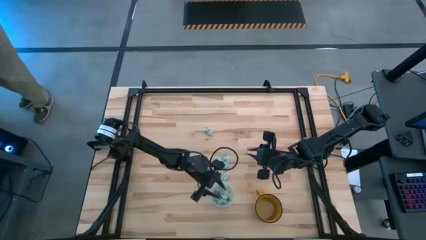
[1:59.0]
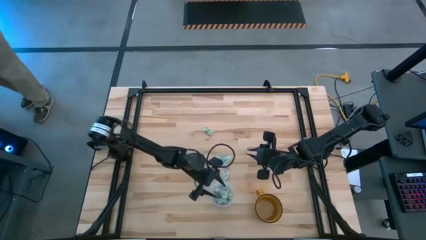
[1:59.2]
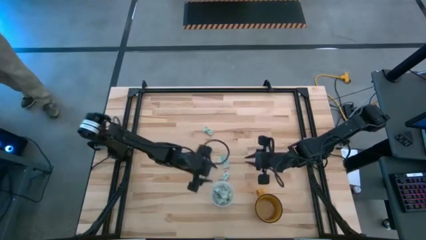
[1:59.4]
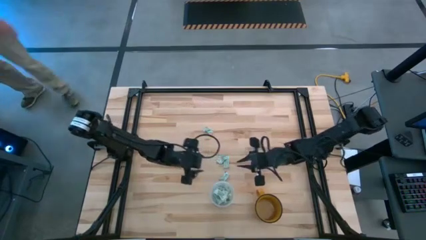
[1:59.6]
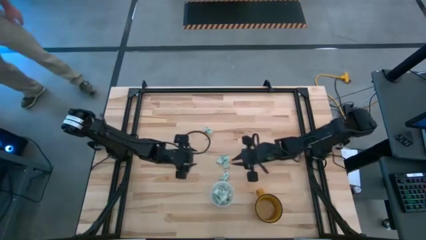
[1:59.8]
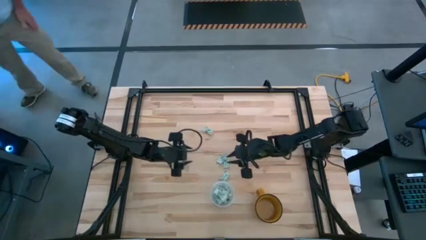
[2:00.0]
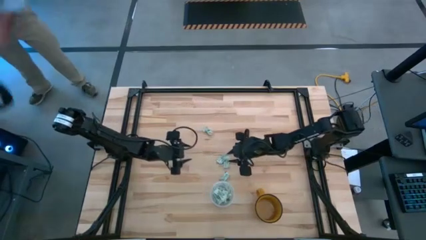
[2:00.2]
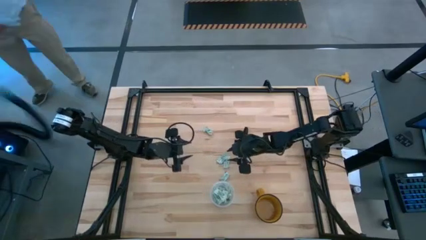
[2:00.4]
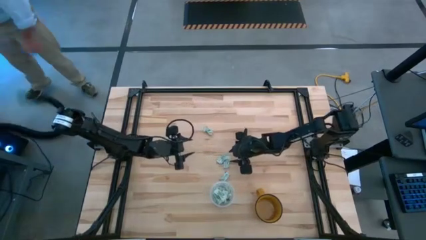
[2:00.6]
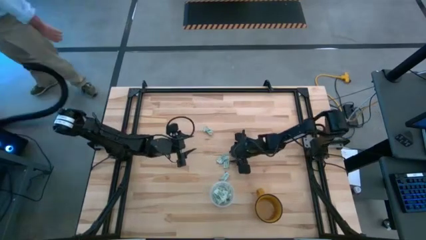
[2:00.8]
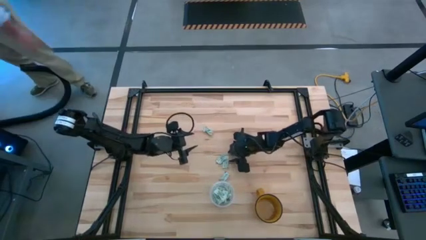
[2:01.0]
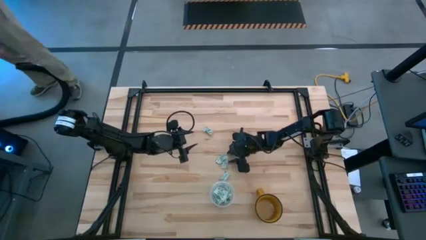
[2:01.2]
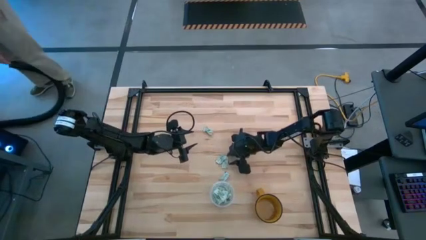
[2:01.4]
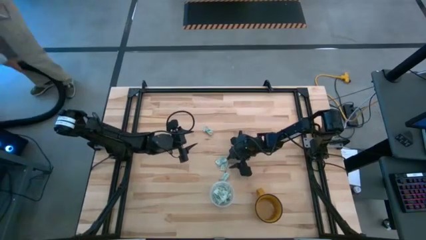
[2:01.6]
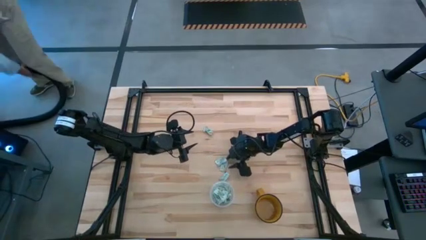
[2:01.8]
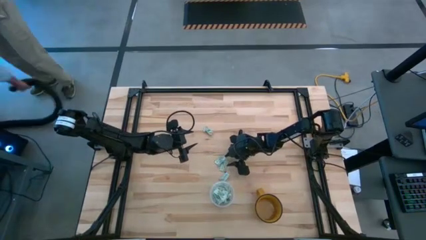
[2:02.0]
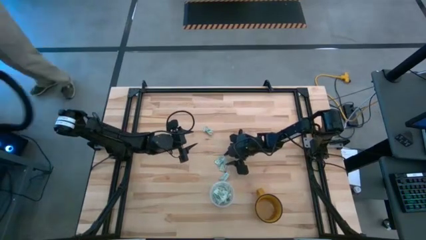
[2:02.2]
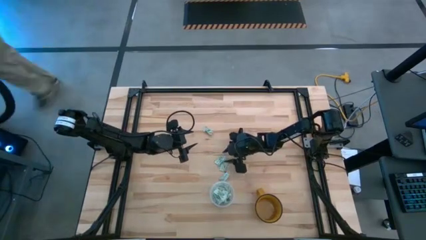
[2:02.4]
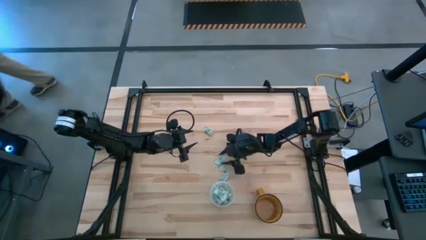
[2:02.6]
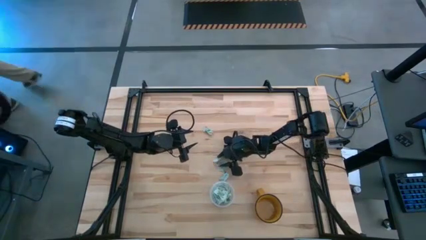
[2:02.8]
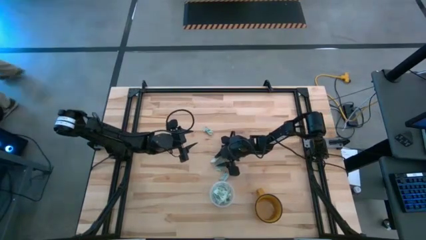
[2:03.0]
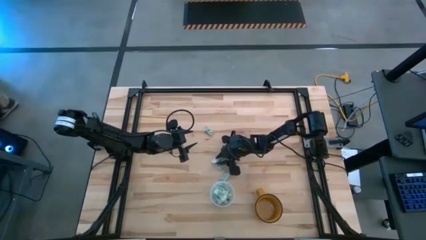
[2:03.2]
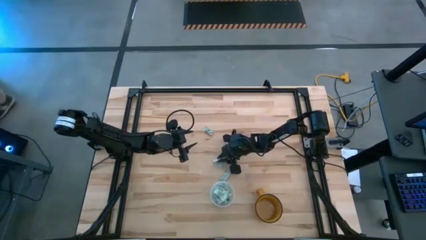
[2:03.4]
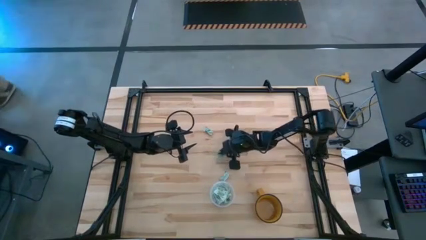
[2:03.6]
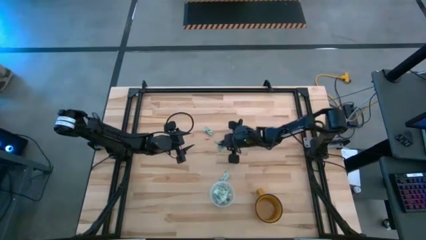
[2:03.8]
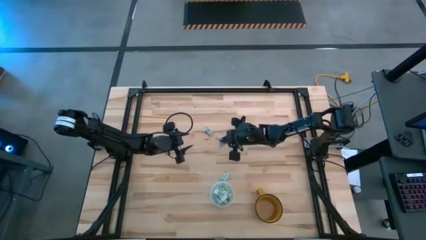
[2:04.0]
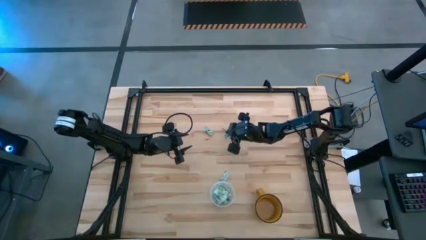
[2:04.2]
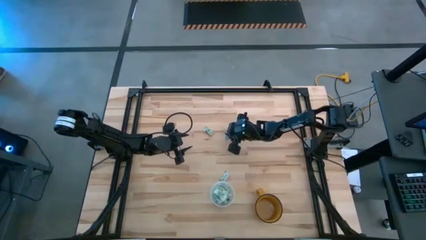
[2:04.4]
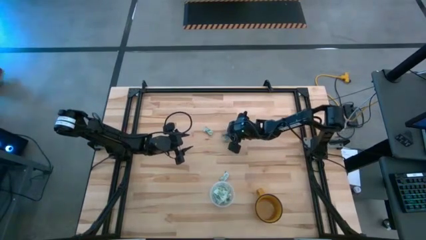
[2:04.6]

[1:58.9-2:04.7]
Task: Pick and place Stevia / Truvia into bins
Put the stevia packet into the transparent bin

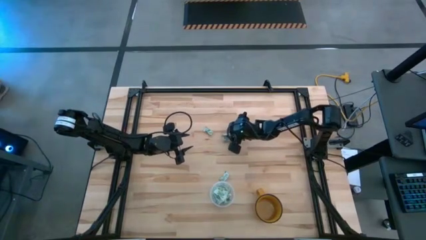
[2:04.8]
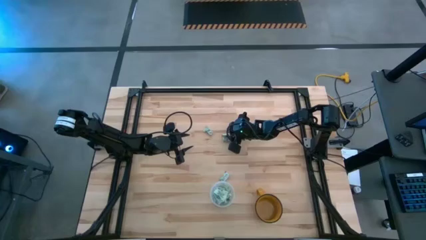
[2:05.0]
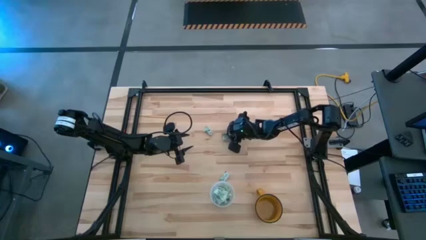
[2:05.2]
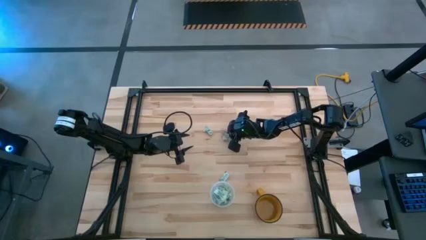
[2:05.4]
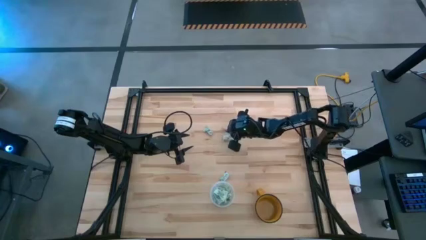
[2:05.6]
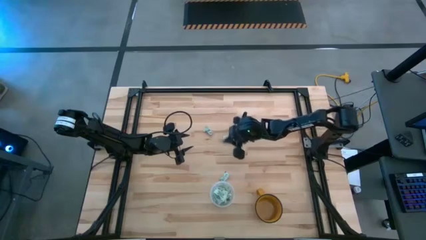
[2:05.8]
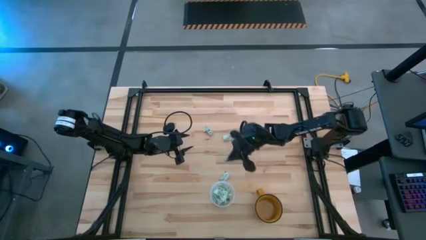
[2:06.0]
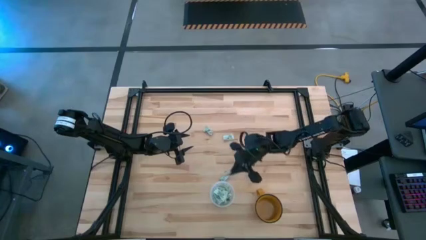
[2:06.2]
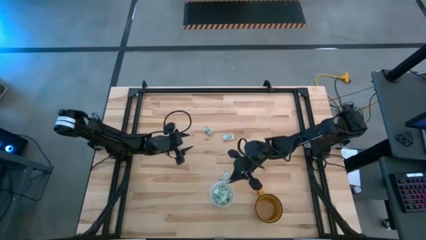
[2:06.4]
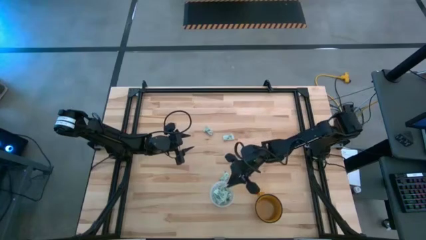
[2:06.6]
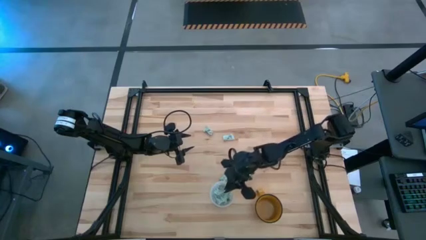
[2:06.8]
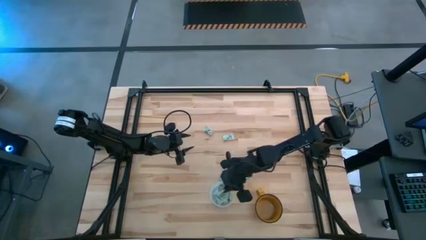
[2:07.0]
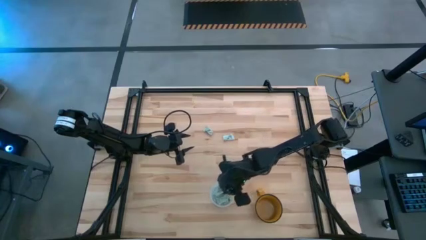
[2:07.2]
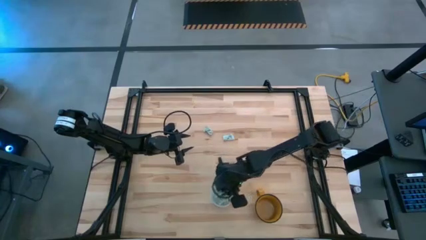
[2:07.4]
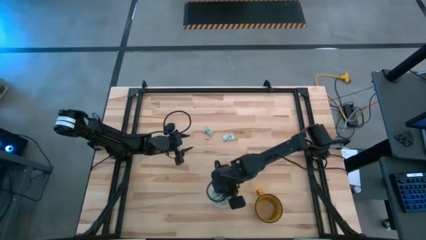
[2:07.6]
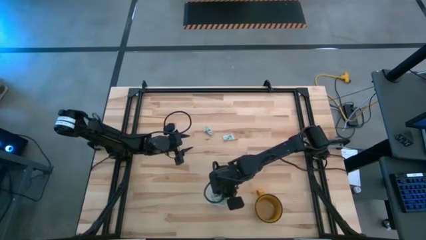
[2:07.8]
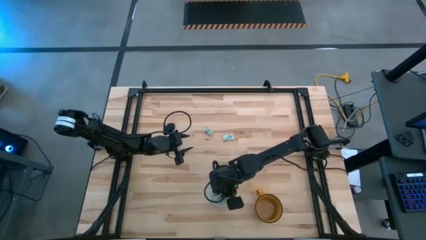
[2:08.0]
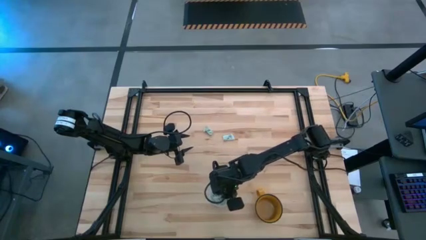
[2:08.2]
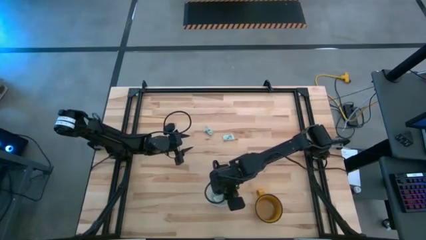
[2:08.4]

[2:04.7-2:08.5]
Put the stevia packet into the transparent bin

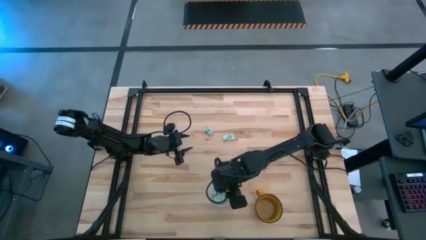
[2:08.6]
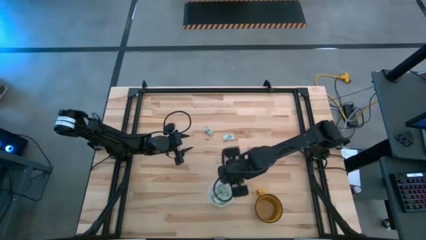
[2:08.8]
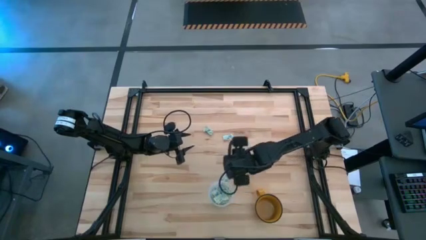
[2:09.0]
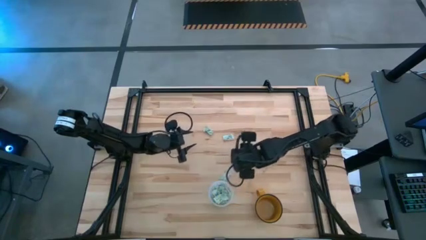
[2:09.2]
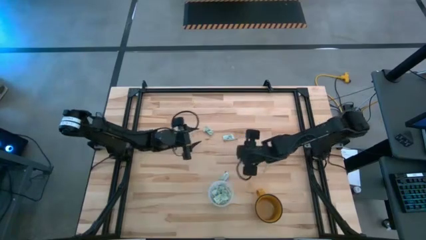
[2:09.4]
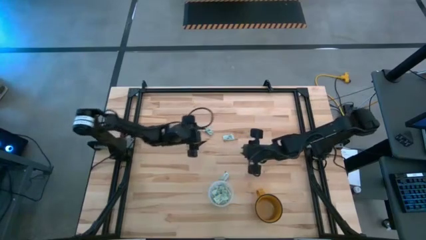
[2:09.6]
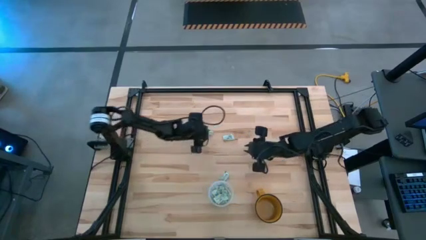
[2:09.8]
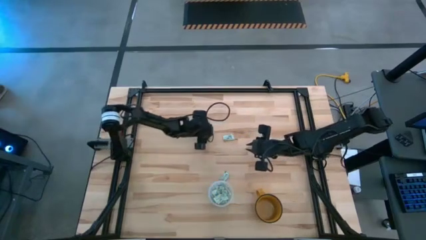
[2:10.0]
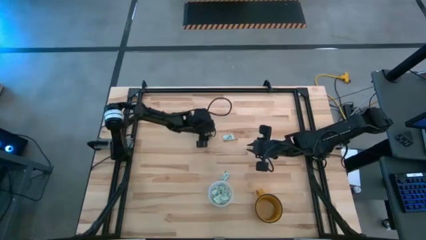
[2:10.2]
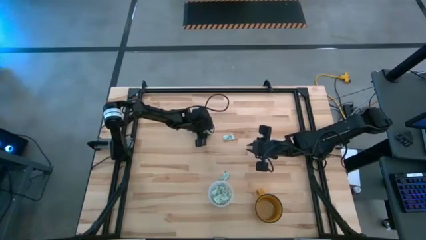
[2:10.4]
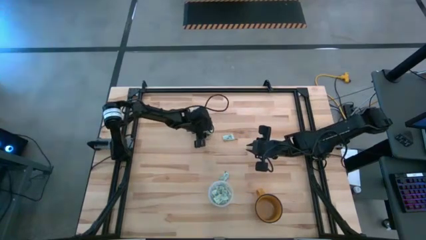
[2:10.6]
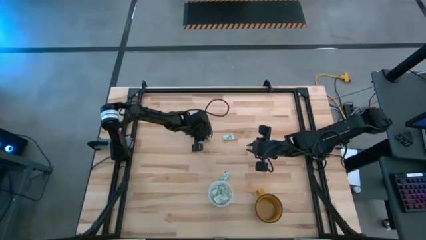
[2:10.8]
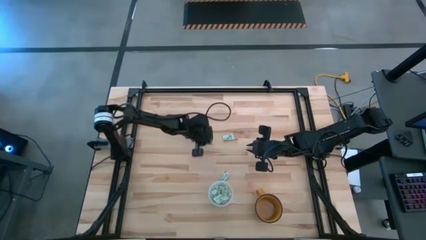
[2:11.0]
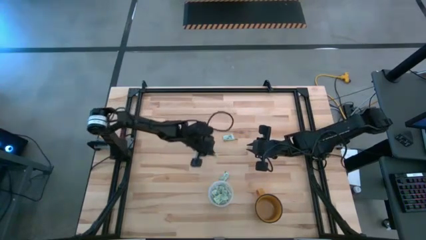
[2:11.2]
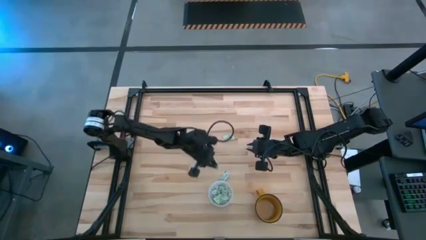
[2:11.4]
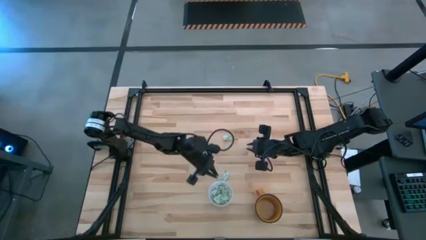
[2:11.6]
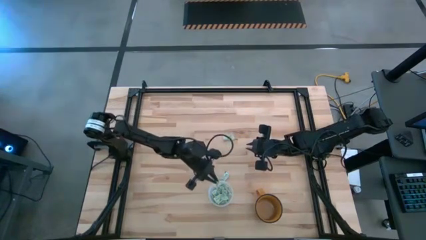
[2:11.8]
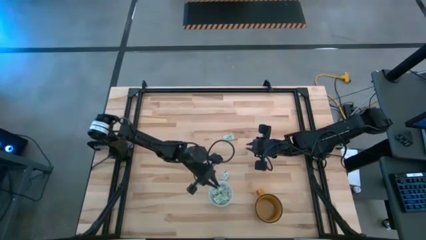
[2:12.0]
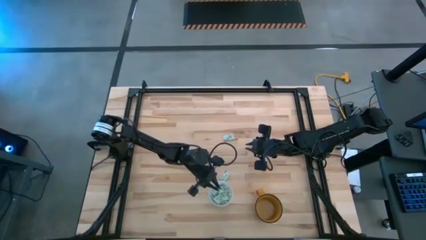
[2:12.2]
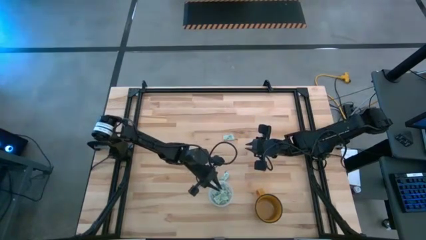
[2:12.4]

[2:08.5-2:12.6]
Put the top left stevia packet into the transparent bin

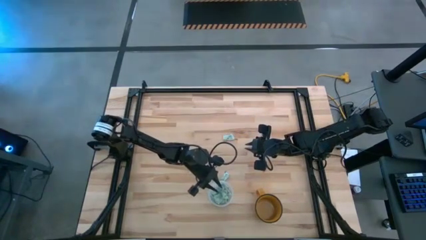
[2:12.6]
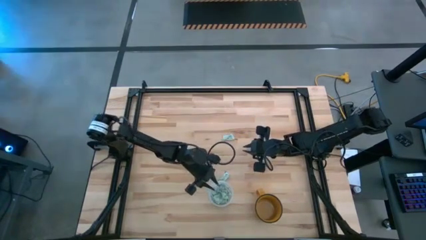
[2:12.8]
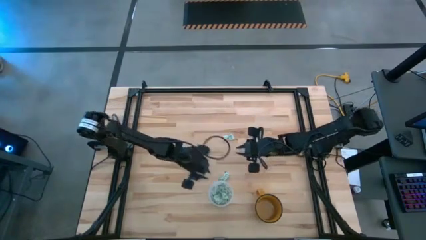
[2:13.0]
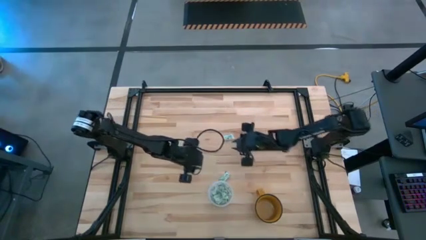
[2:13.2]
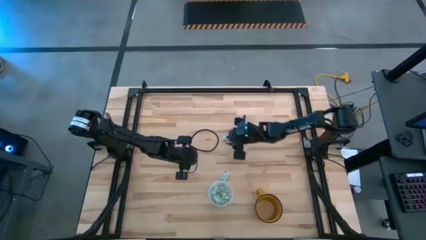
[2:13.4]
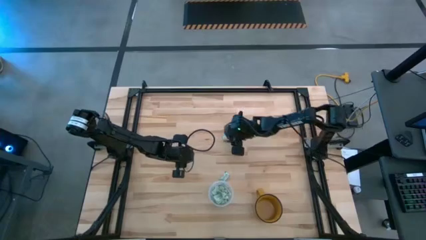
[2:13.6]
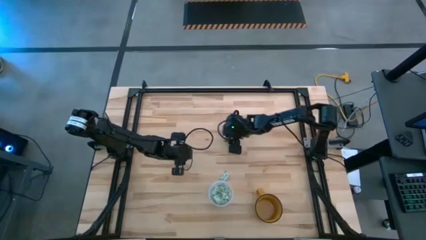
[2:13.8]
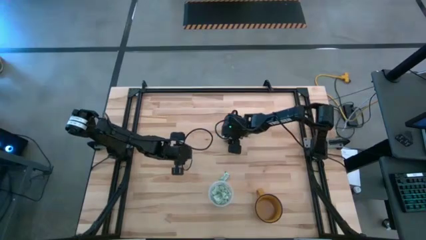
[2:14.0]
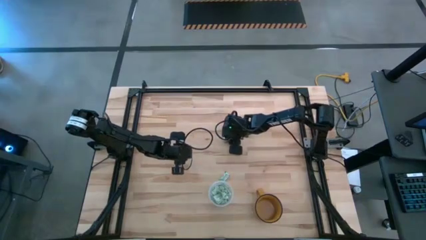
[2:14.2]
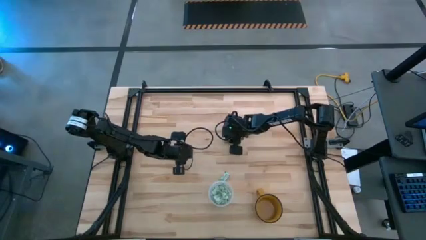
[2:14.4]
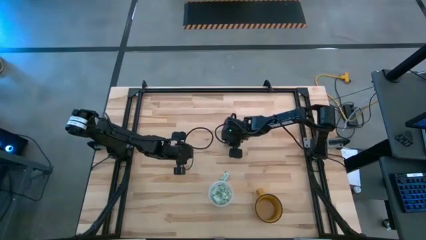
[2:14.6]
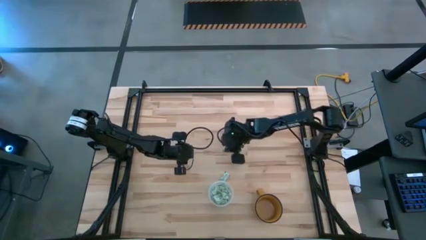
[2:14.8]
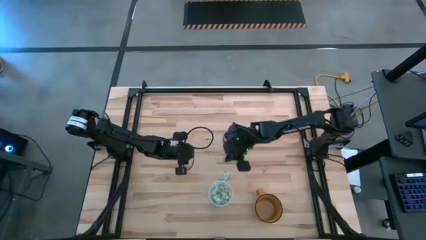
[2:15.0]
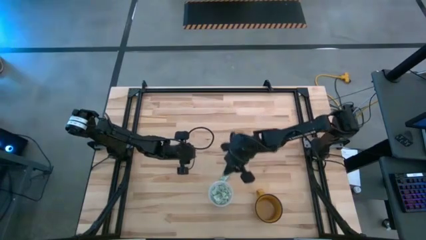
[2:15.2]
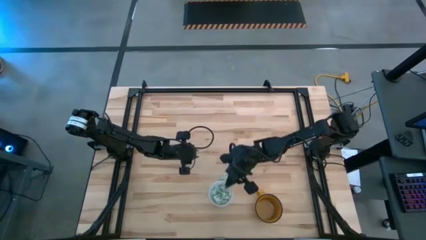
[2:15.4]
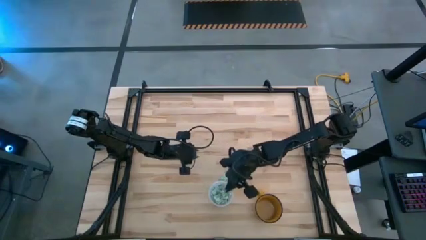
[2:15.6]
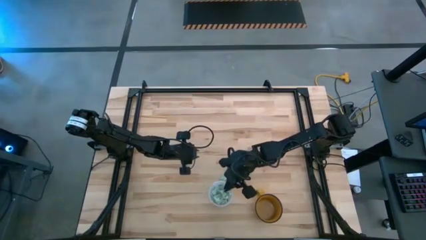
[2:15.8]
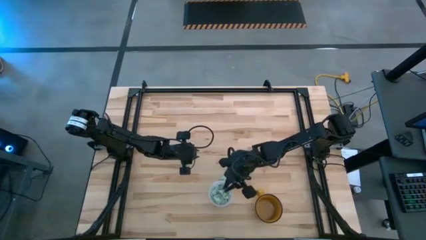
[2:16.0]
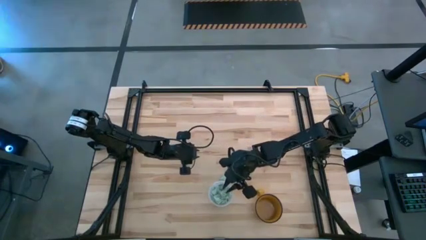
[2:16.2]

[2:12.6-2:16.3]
Put the top stevia packet into the transparent bin
